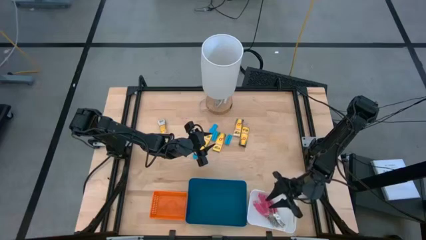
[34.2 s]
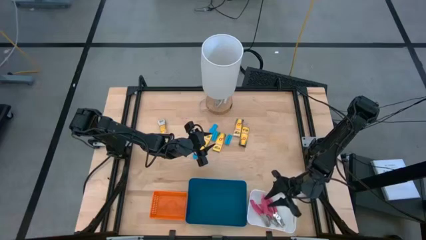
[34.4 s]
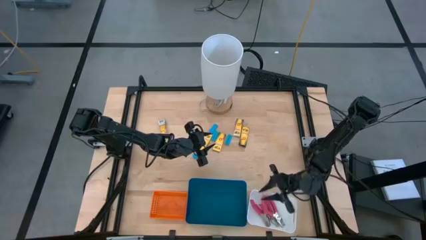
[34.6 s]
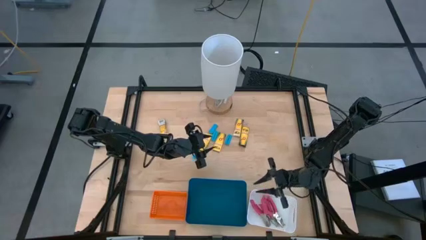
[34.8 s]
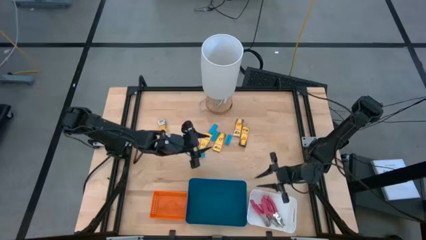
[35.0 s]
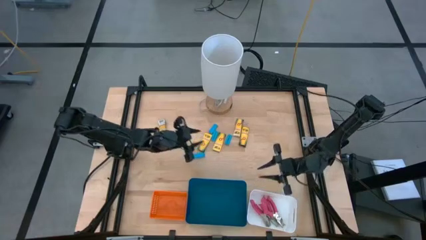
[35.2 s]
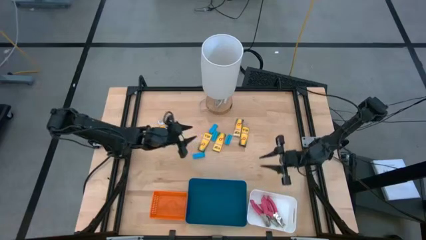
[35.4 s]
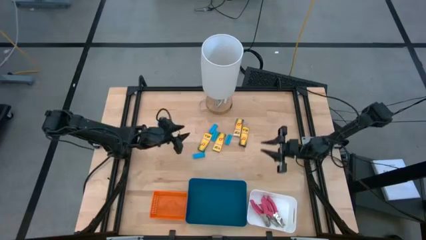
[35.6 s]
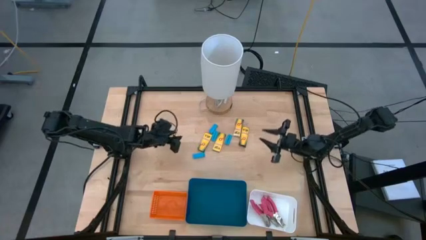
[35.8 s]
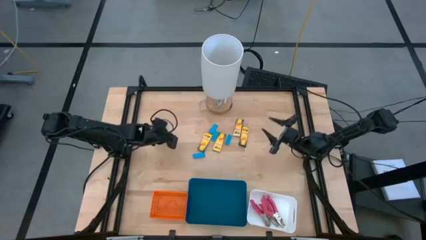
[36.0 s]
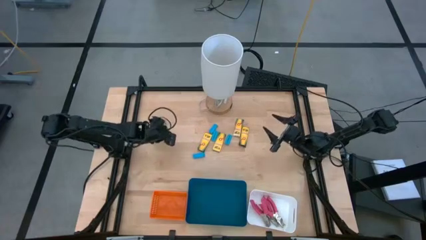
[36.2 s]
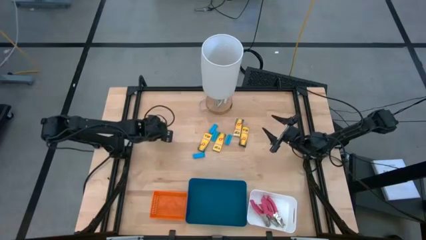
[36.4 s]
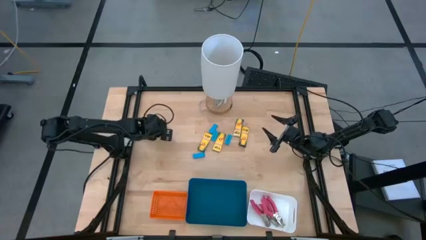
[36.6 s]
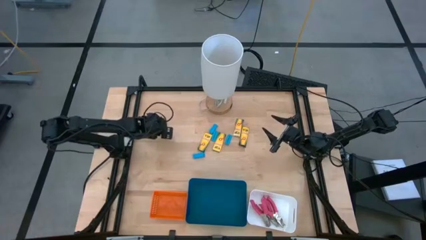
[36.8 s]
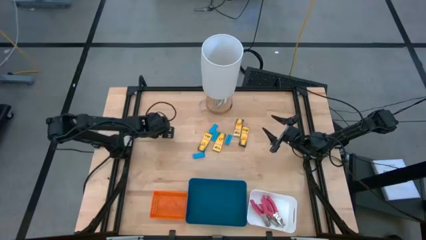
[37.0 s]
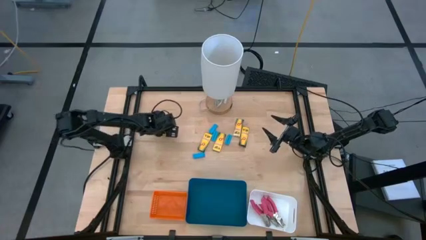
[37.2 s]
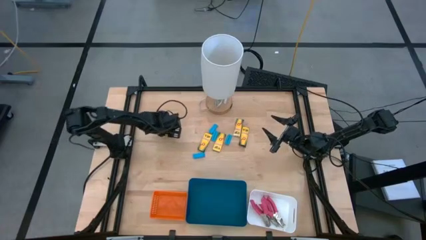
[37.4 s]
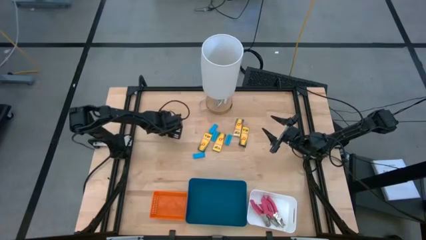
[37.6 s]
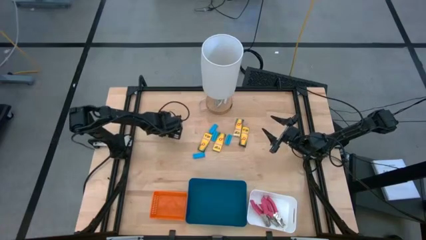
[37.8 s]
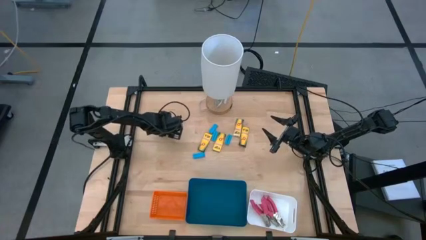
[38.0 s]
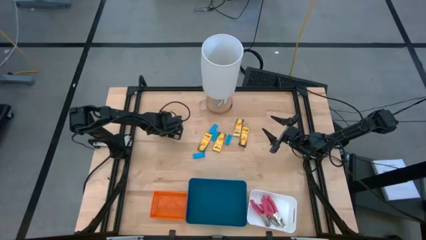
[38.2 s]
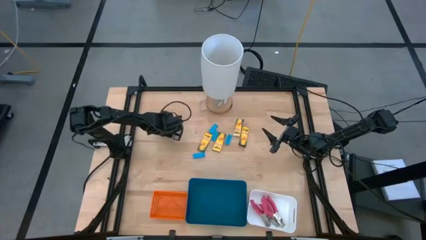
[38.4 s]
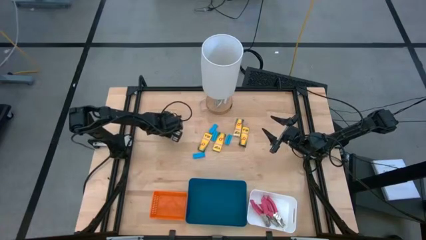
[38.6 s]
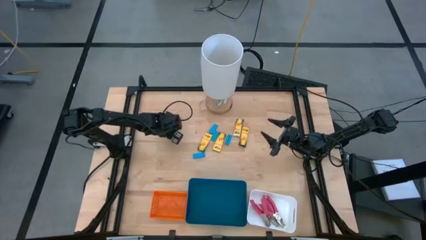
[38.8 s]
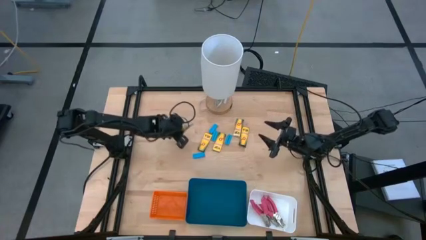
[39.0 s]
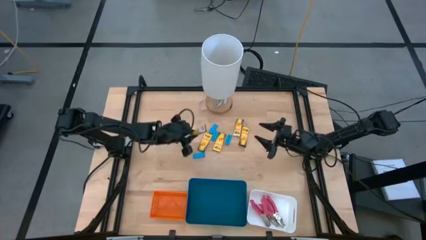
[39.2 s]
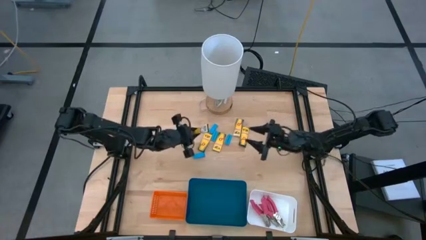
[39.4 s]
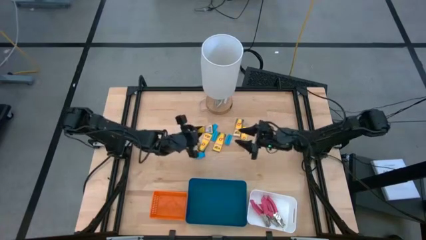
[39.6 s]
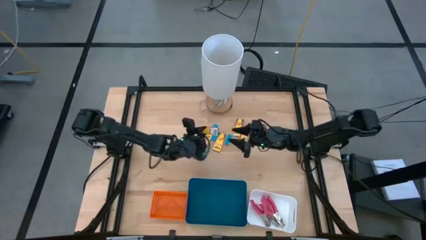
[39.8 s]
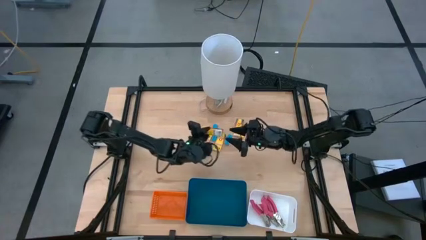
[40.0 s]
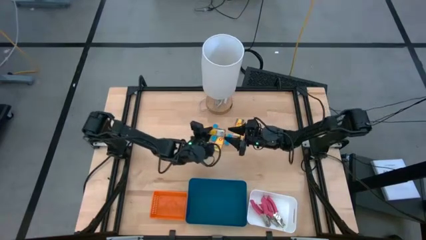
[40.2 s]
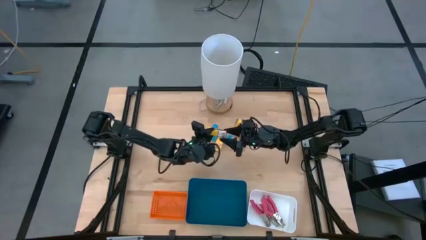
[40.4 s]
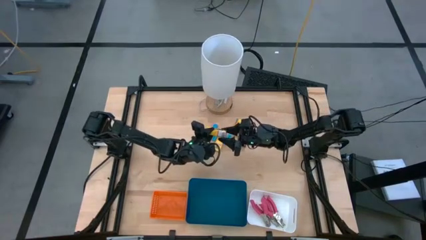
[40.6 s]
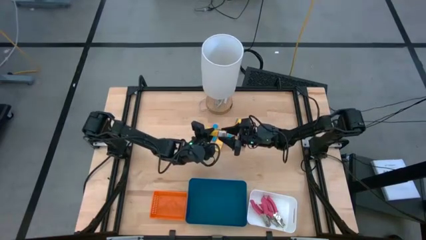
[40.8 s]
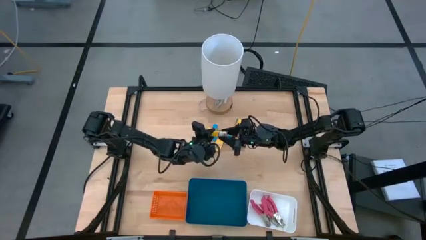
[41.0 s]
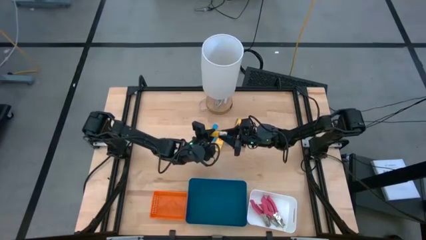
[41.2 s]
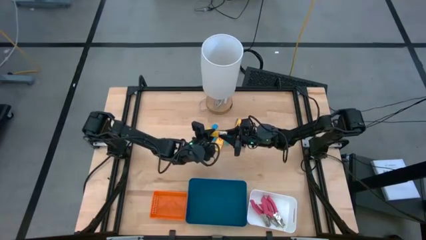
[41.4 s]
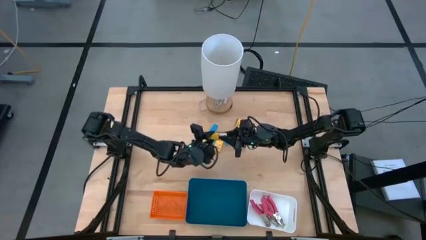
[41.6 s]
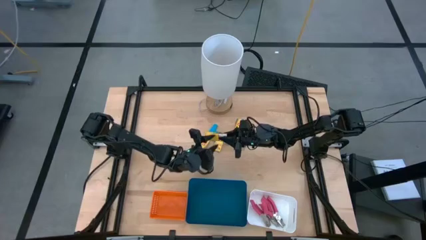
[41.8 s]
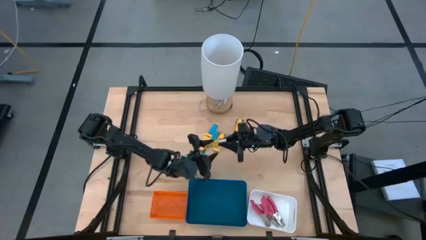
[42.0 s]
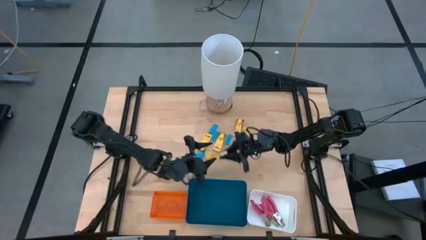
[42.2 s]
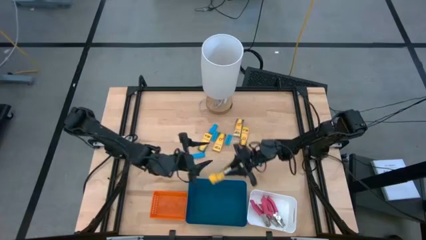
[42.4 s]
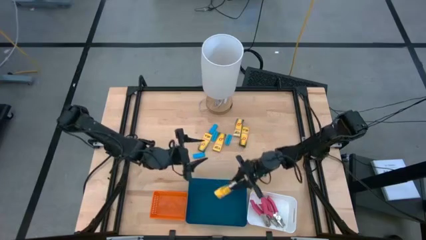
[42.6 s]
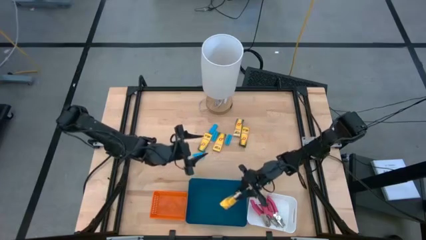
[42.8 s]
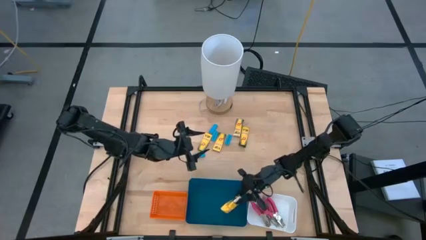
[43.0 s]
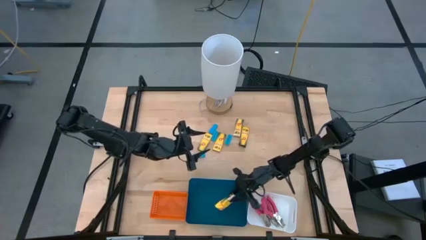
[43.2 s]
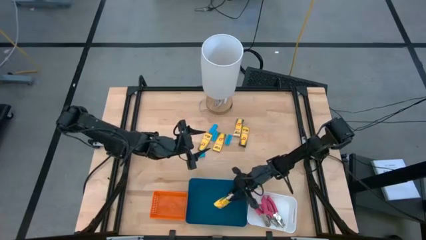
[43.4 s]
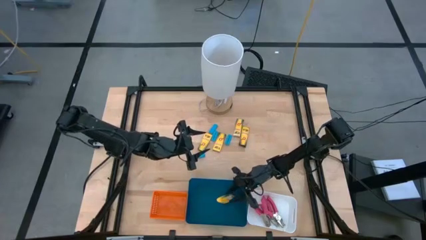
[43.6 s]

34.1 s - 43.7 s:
Task: Pick & Place School Supplies
Put the yellow crayon box into the blue bin

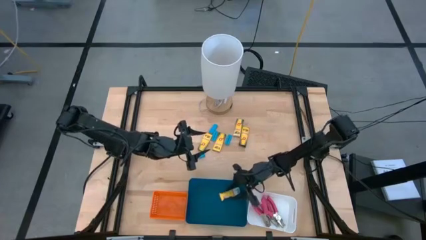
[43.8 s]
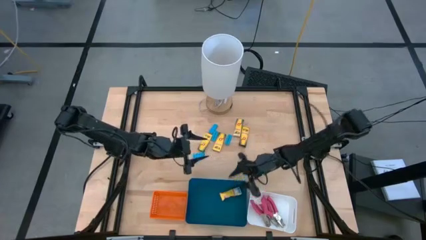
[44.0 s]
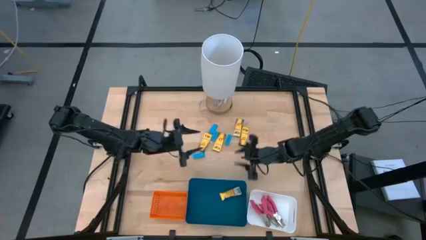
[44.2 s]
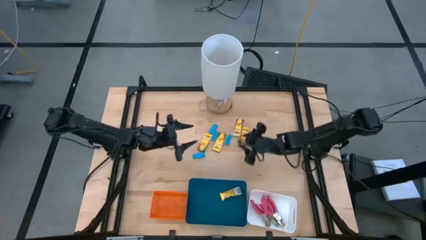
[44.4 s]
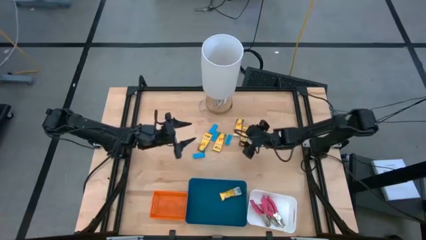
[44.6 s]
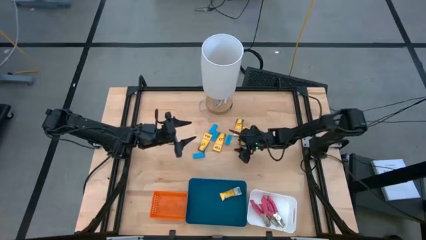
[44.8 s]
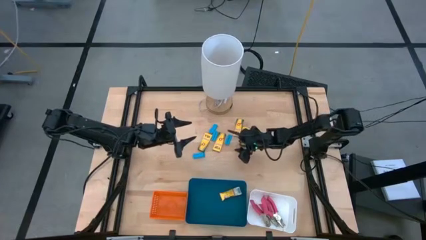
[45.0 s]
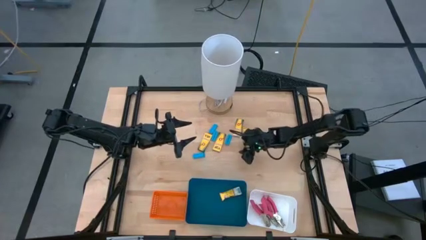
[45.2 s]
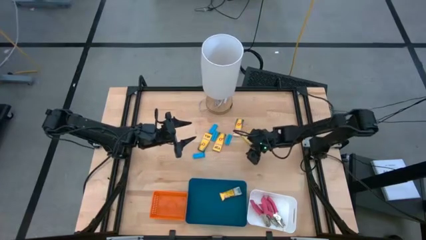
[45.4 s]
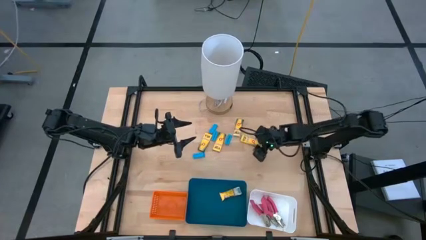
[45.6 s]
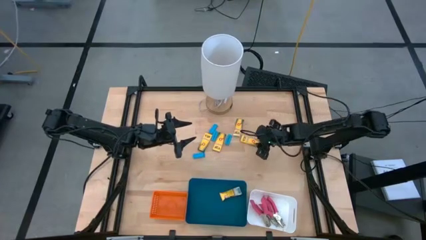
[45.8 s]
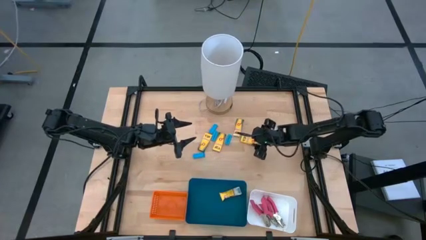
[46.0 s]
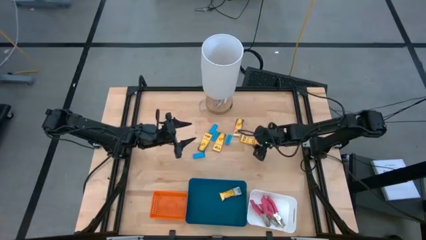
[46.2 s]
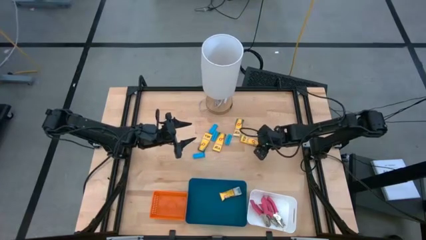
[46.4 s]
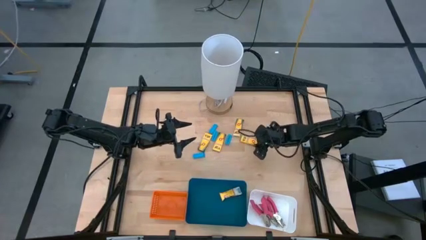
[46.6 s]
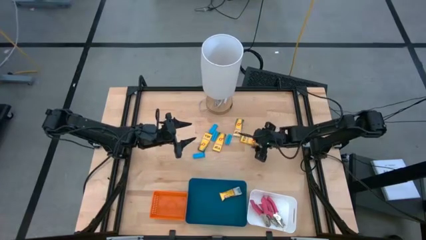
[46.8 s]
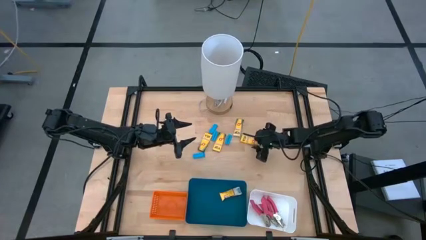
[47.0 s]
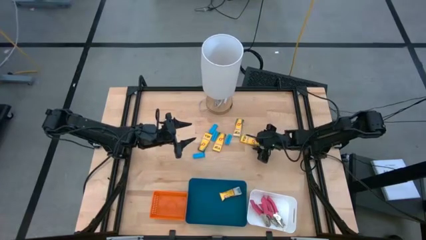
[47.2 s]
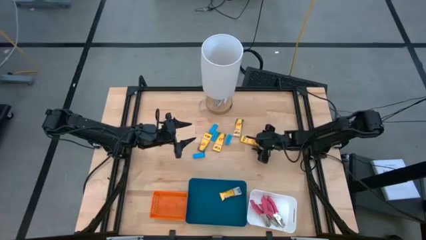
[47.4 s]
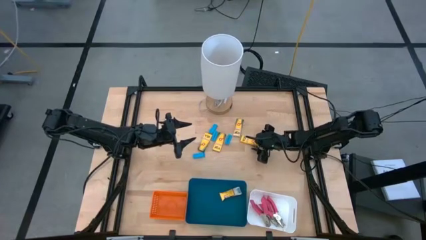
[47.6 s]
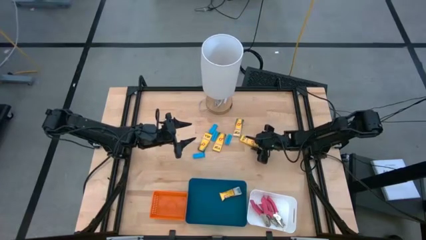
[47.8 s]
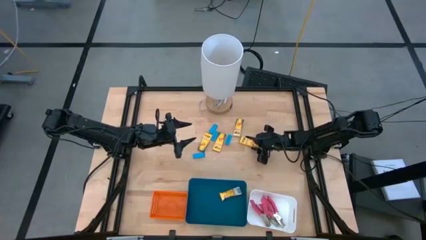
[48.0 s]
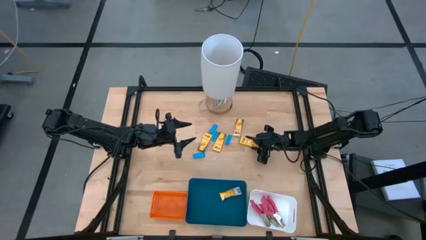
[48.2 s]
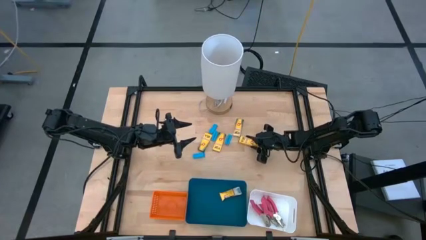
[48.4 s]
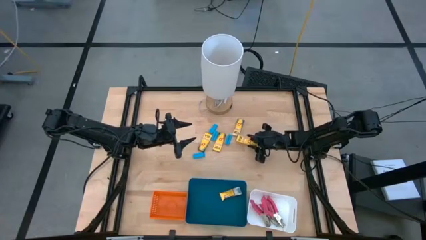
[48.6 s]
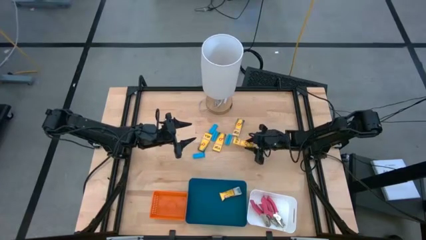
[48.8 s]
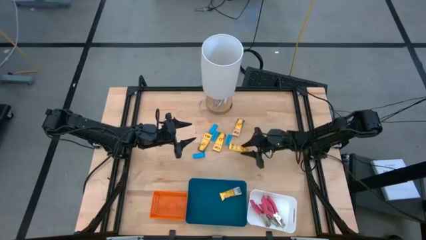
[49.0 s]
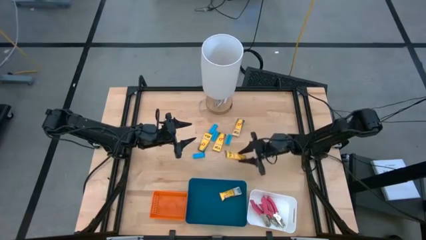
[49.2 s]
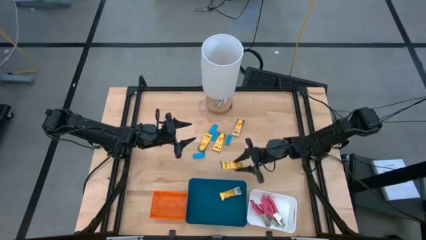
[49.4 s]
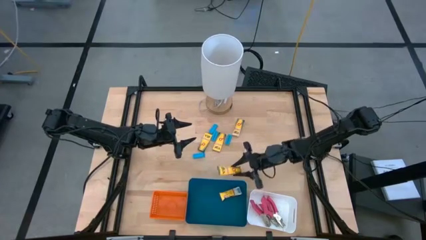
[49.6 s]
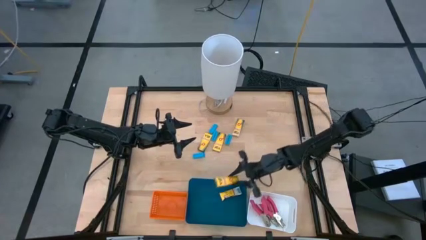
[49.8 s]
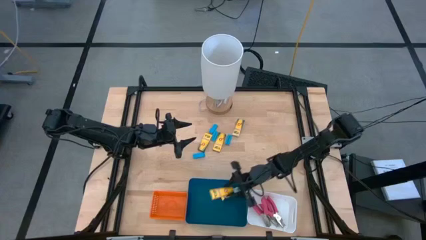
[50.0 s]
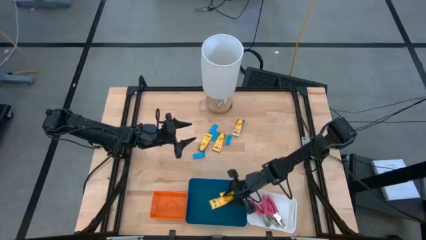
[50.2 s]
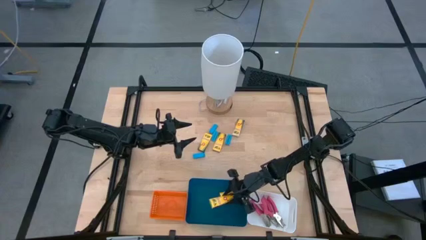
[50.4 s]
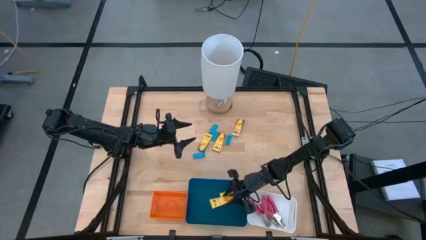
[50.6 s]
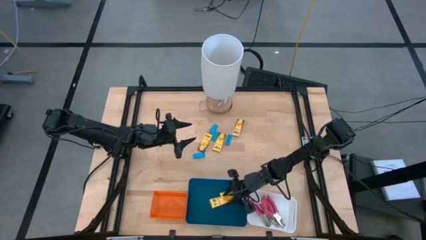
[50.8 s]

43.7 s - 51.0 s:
Put the yellow crayon box into the blue bin
